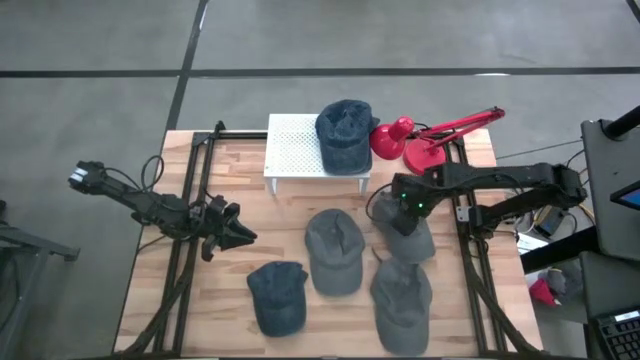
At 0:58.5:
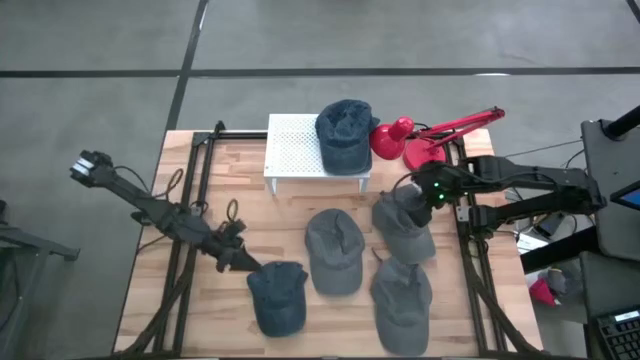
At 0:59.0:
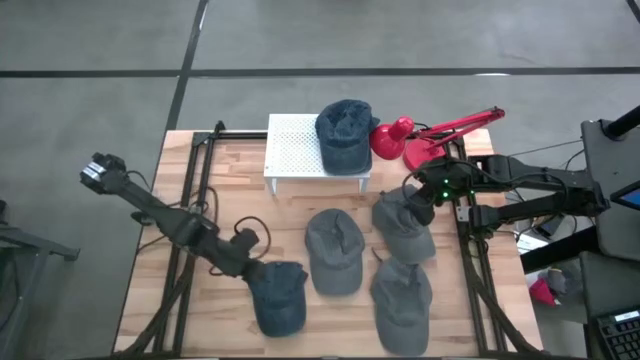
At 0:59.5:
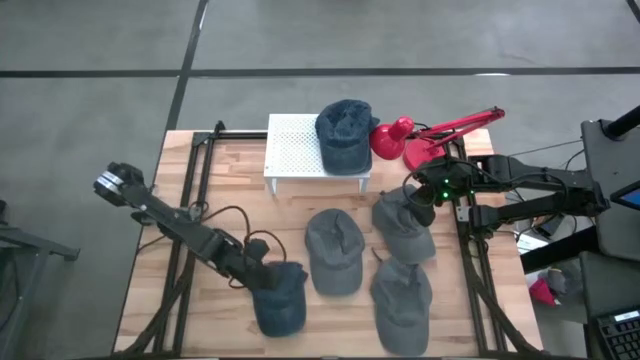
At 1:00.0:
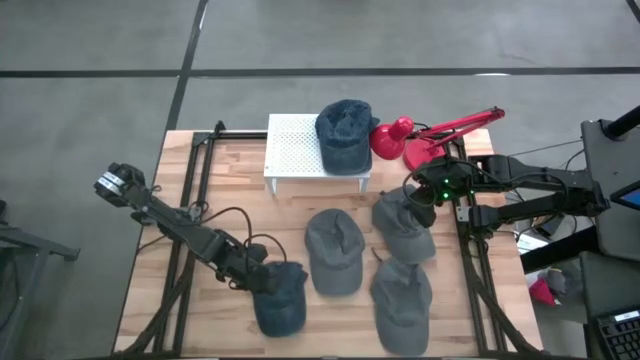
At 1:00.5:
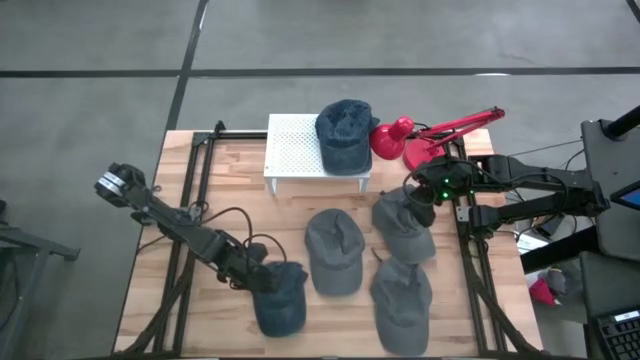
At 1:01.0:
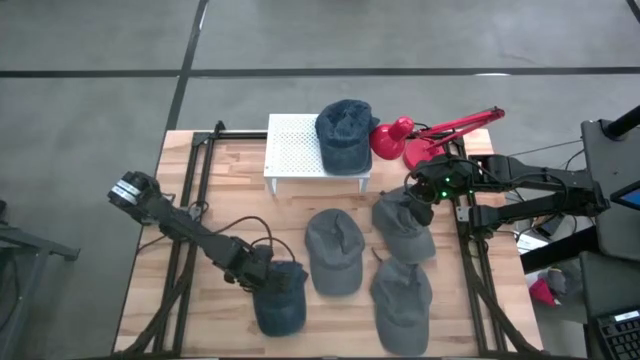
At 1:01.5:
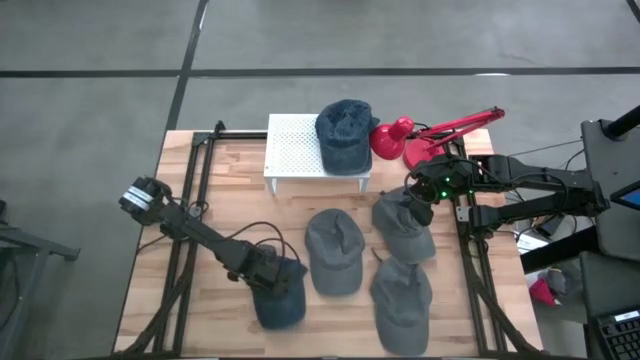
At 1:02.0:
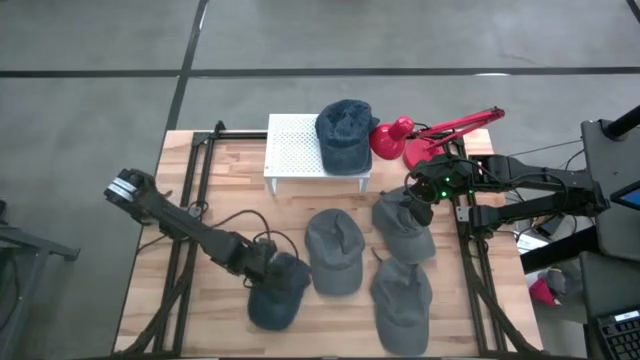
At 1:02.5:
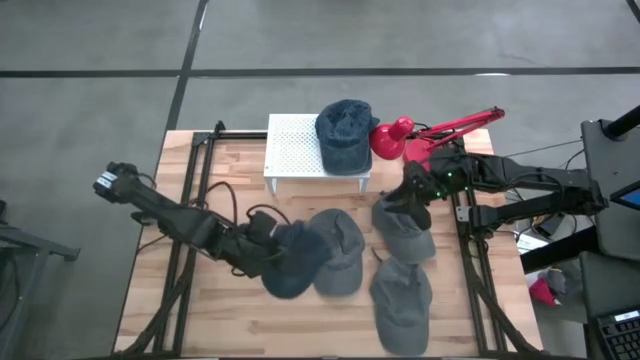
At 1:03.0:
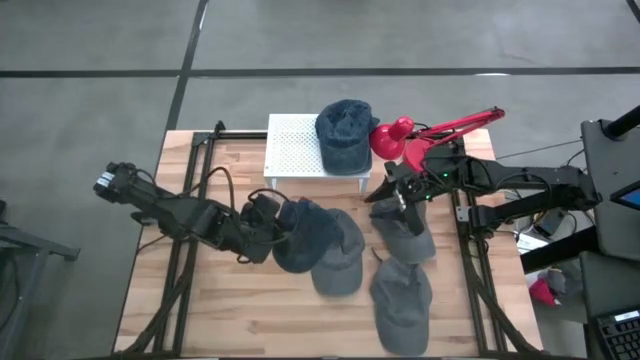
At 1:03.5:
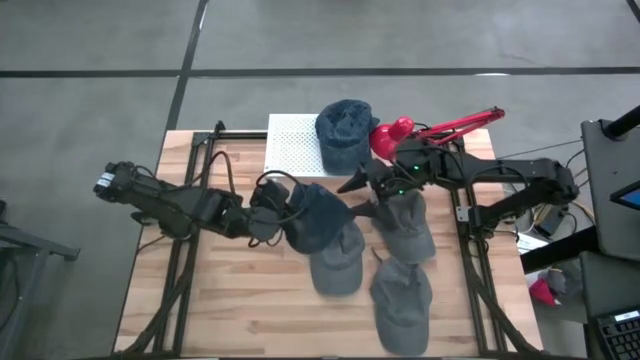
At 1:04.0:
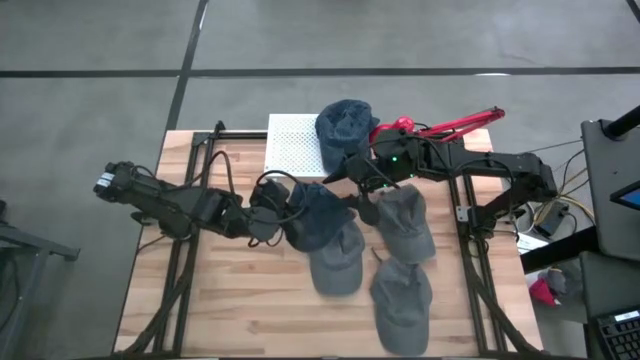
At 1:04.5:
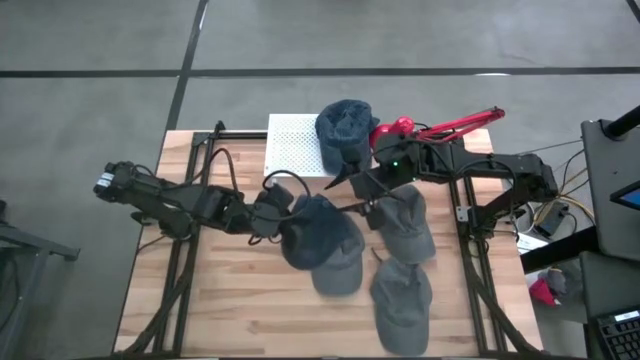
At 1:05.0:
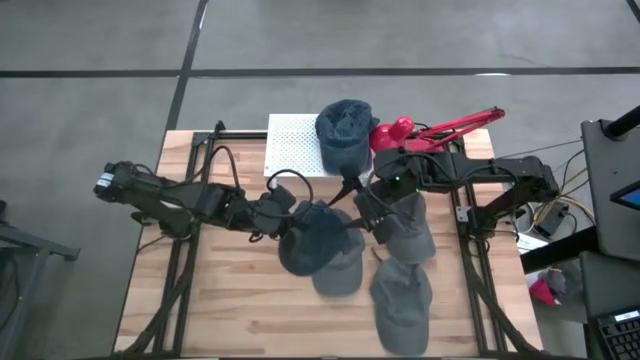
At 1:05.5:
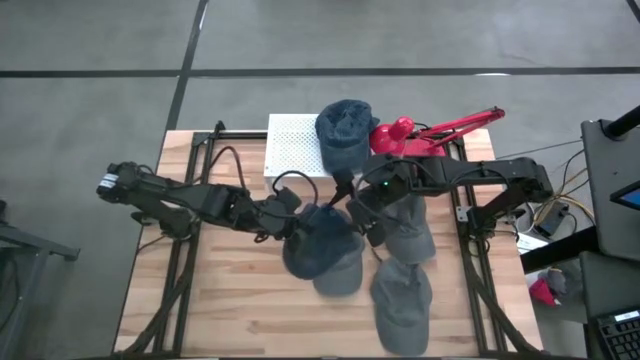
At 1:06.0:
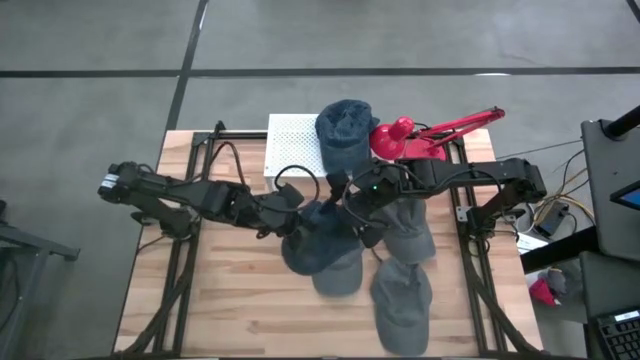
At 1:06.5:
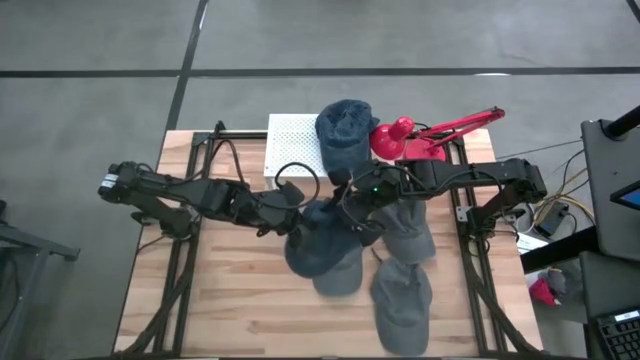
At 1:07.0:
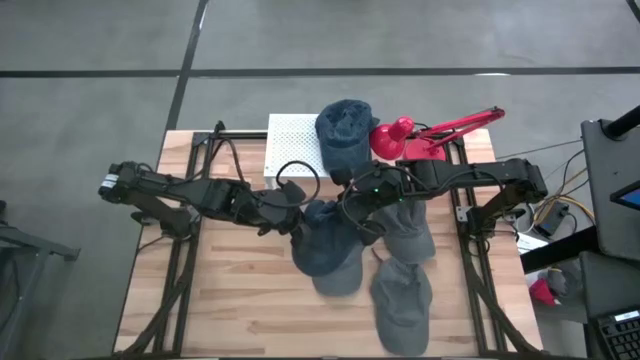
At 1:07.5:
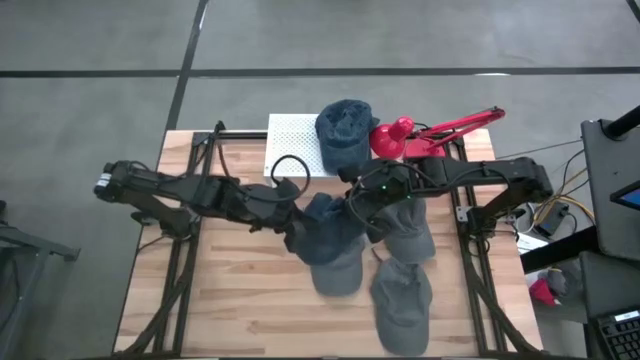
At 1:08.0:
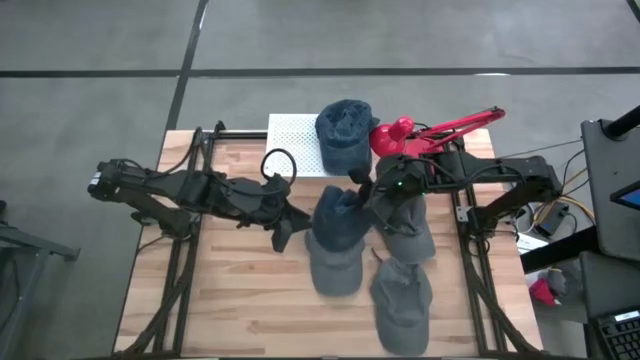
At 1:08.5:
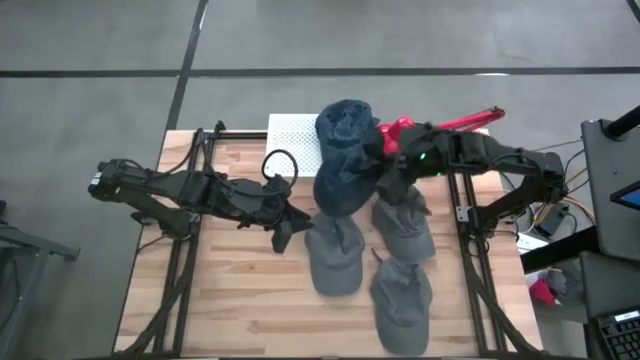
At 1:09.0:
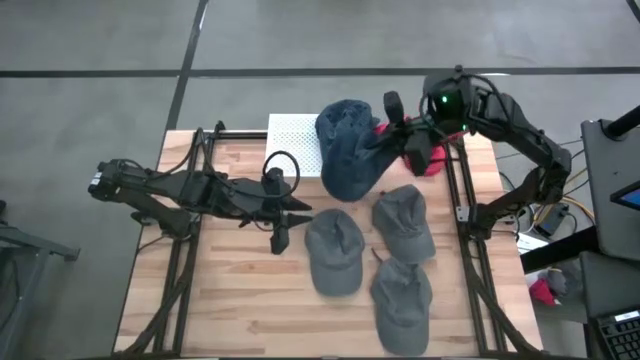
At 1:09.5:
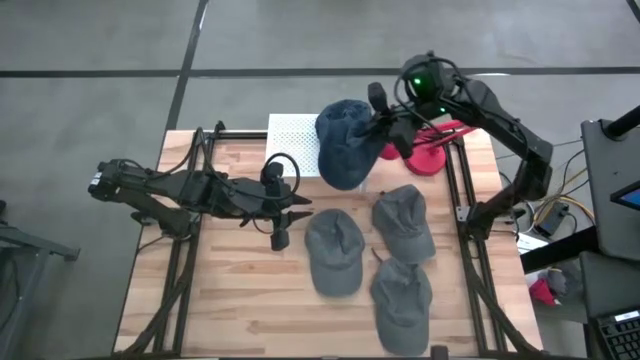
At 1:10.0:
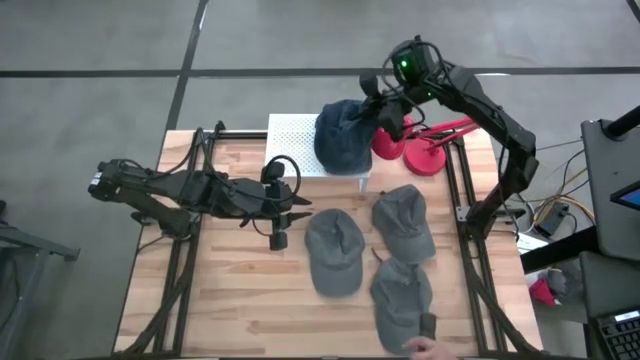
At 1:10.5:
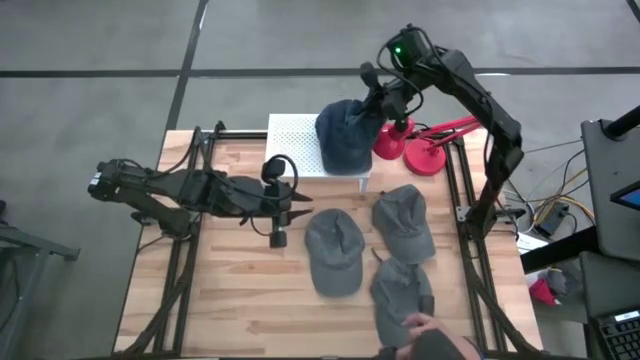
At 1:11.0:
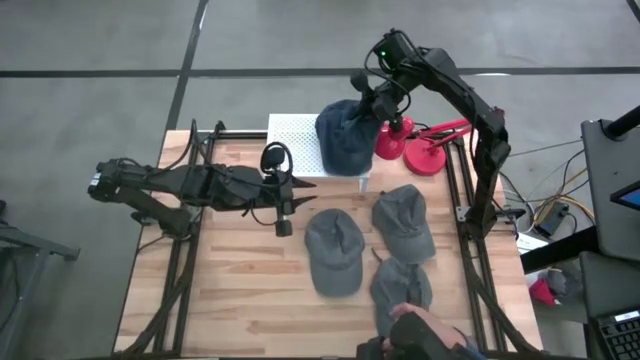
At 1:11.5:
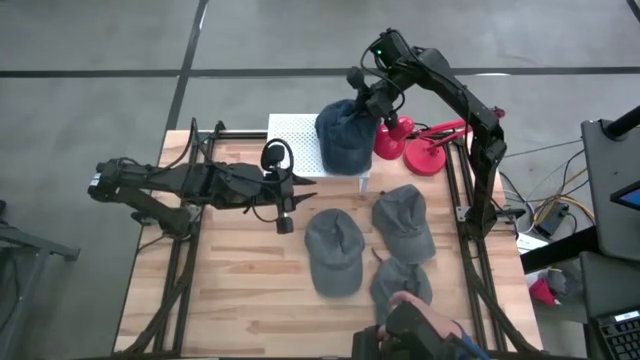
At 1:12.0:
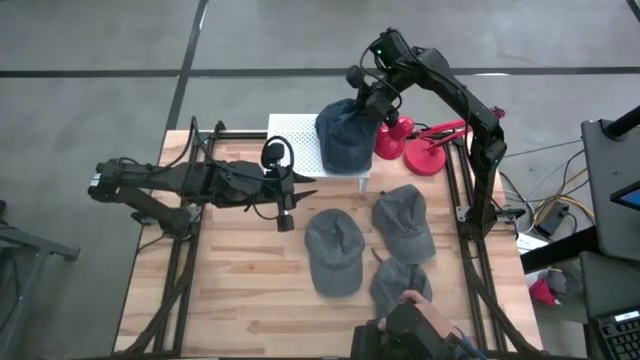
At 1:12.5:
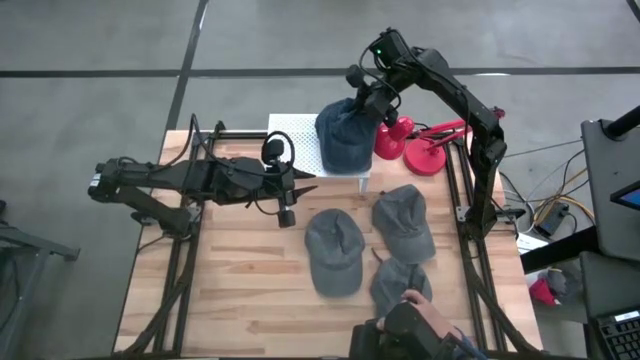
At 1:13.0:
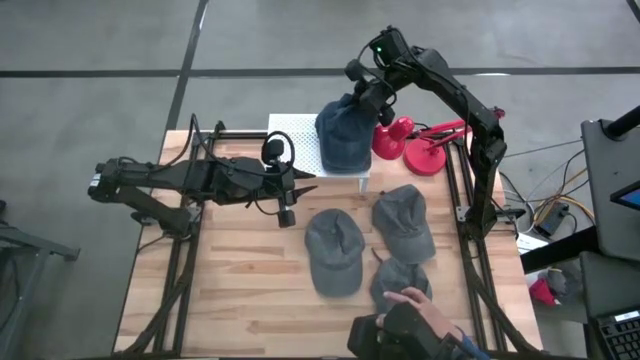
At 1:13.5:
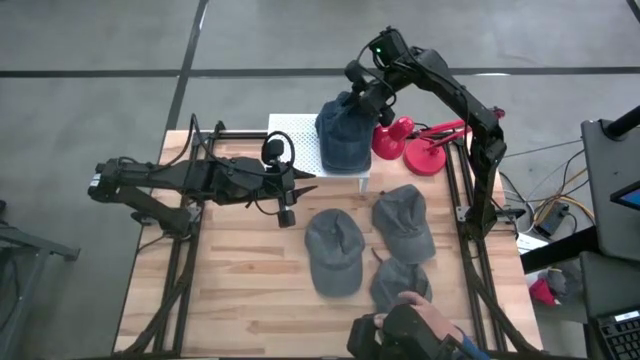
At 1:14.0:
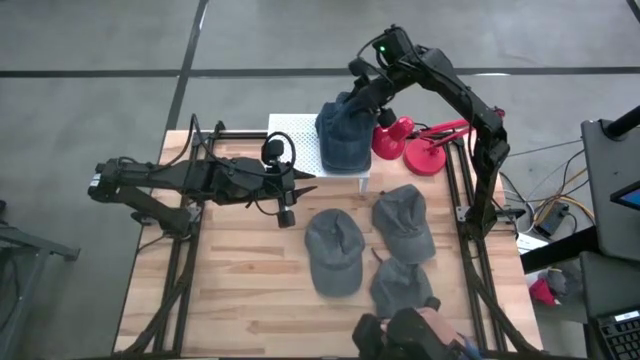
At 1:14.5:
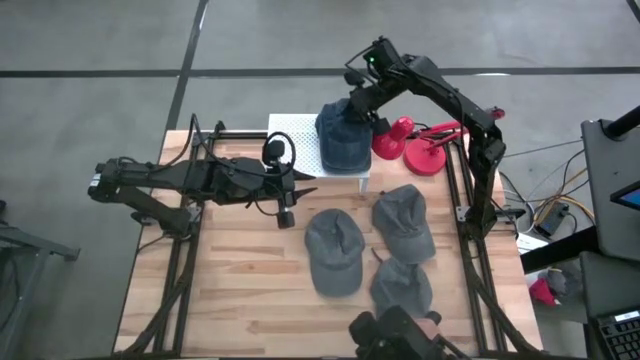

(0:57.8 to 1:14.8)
Task: Pick & Place hat
Stack the blue cap on top of the blue cap on the shelf

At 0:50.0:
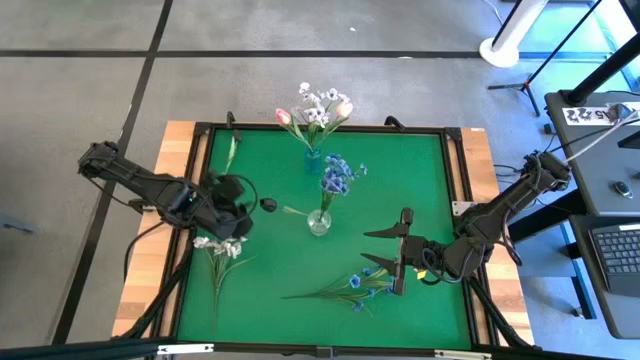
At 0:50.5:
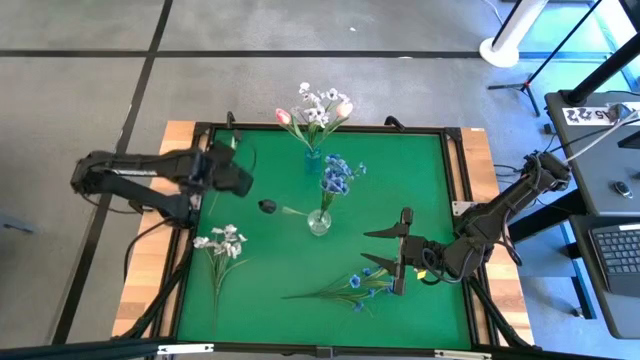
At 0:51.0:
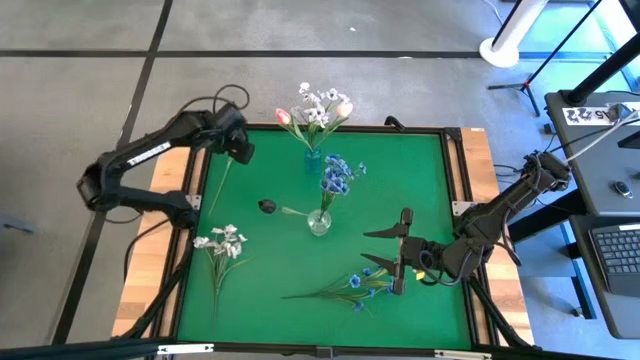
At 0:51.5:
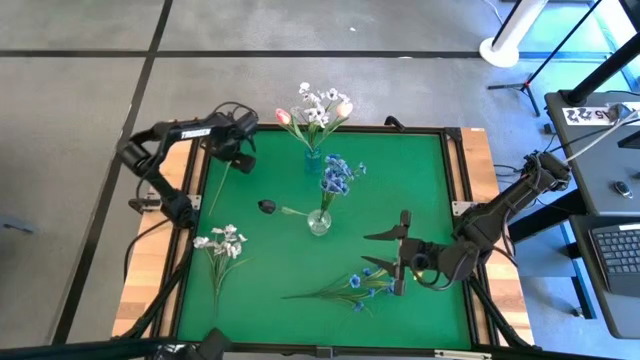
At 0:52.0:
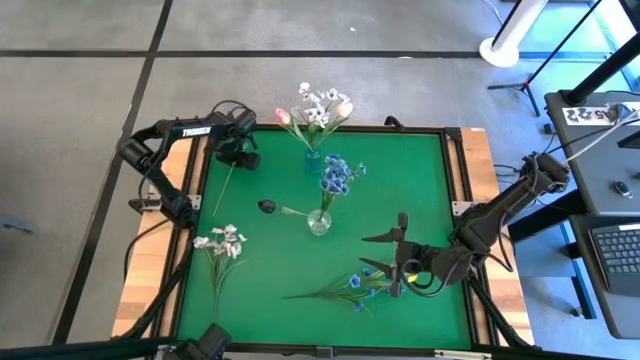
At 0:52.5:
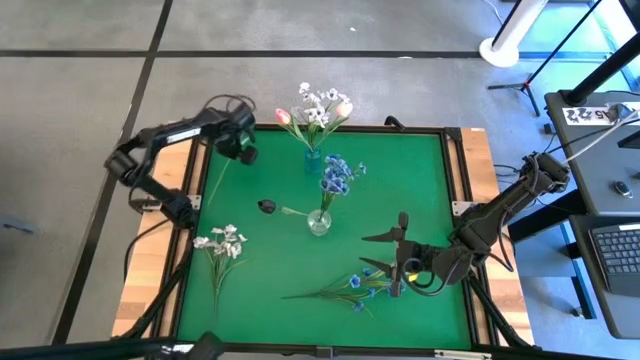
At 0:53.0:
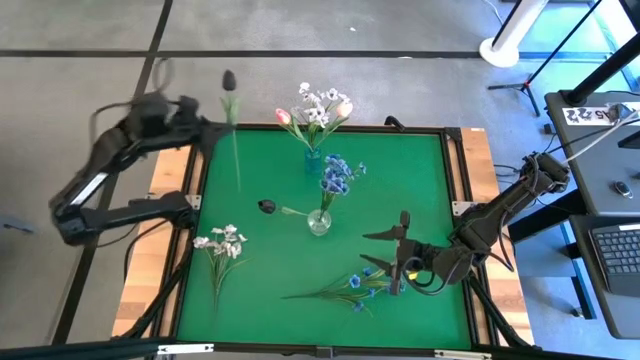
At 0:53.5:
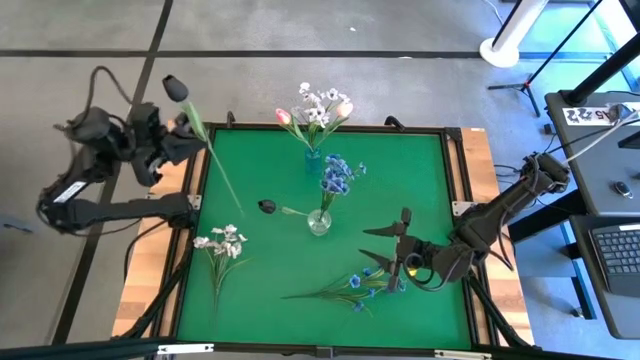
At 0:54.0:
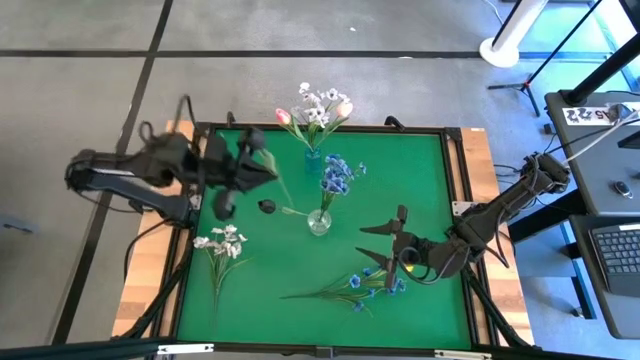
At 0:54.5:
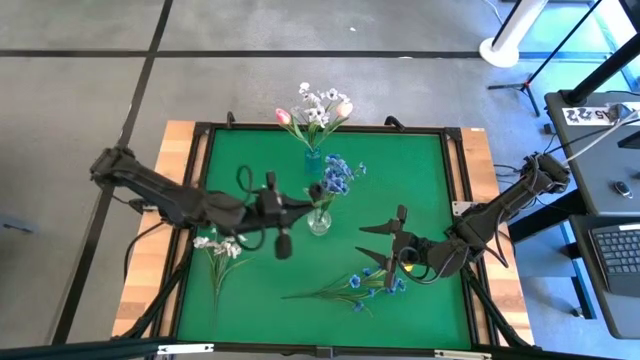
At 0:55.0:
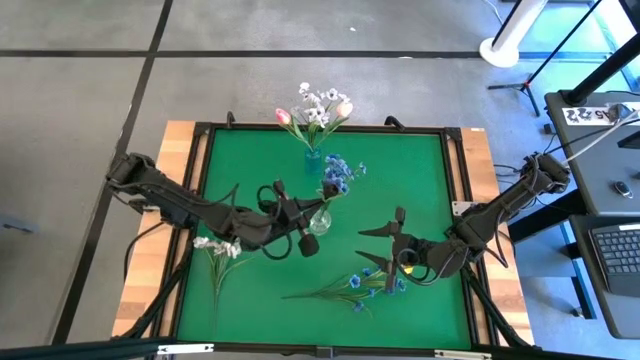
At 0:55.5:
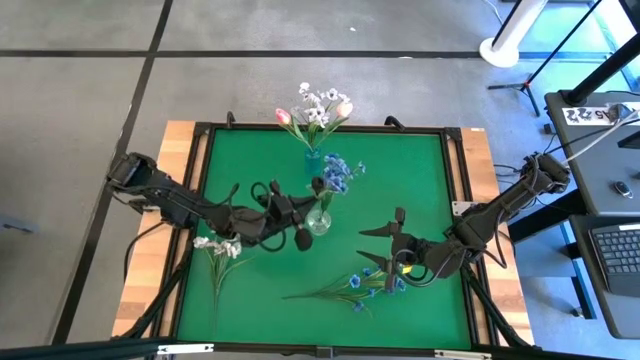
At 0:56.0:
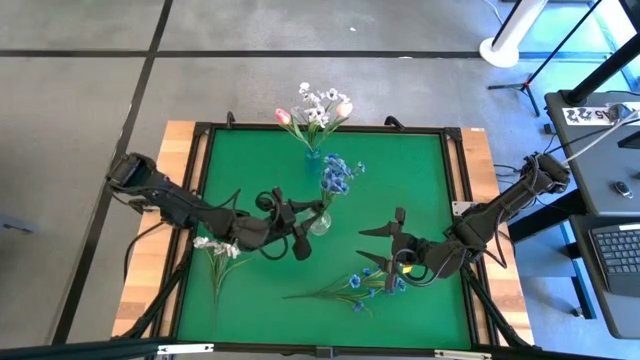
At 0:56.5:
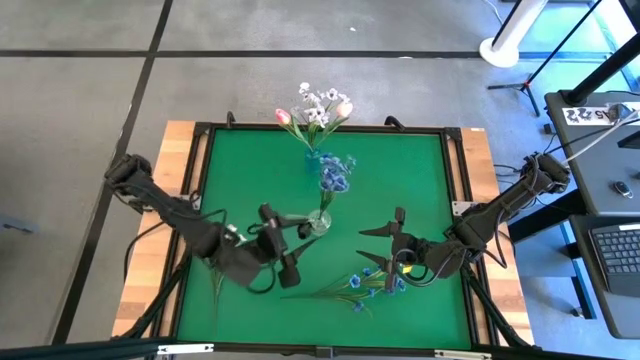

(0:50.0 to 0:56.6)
Task: Sort flowers into vase by color
Put the black tulip into the transparent vase
